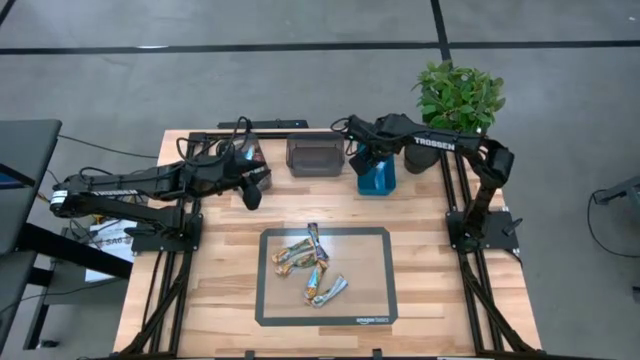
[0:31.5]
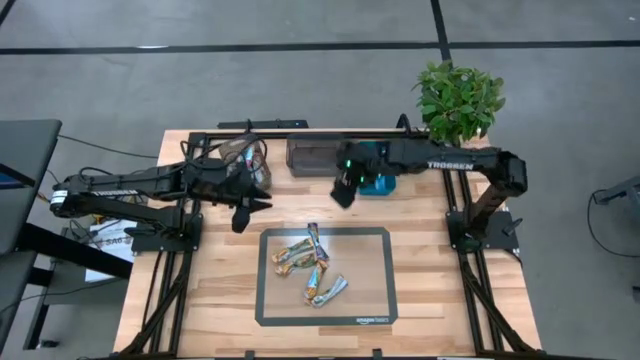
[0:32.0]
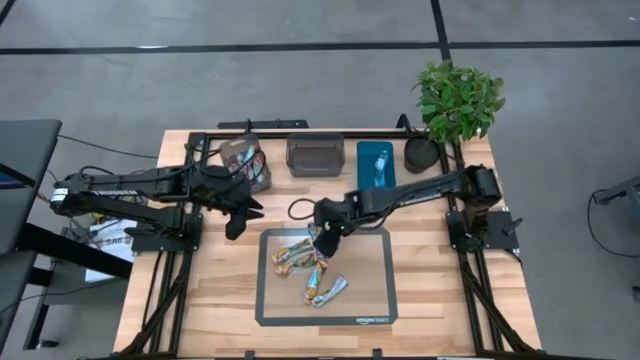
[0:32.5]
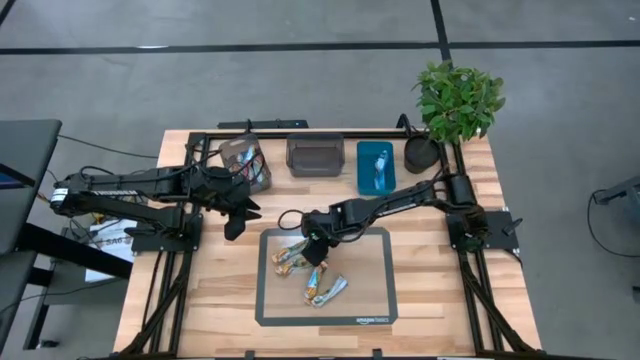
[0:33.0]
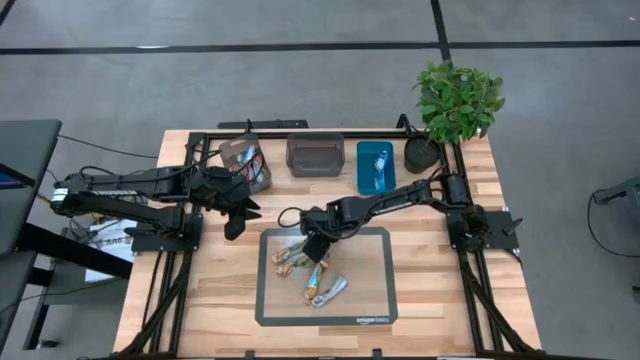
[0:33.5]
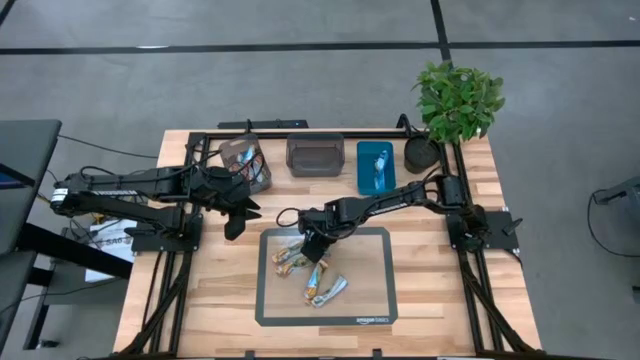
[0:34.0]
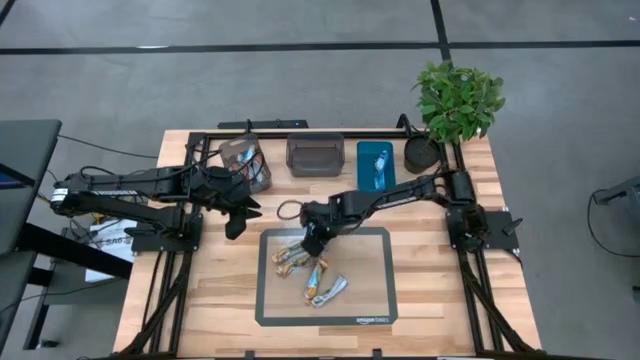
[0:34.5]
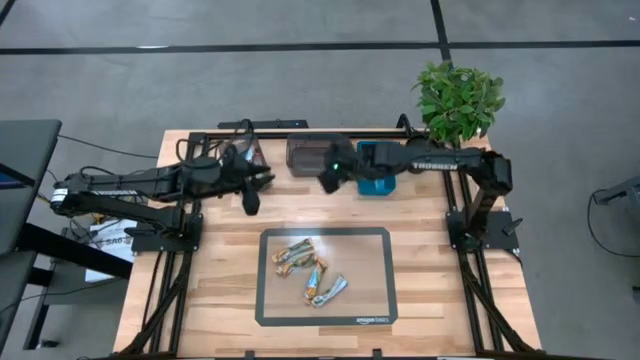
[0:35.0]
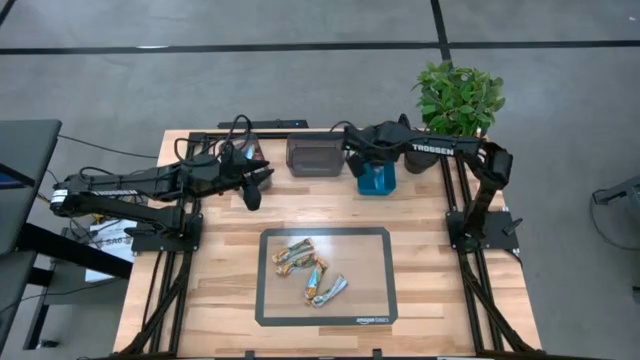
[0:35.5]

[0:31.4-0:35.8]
Task: Pick and place Granola Bars by type
Put the blue granola bar into the blue bin

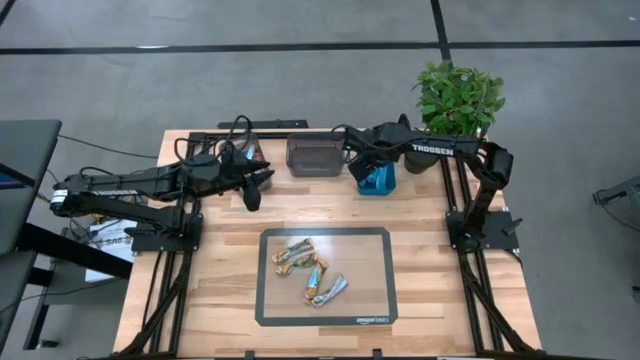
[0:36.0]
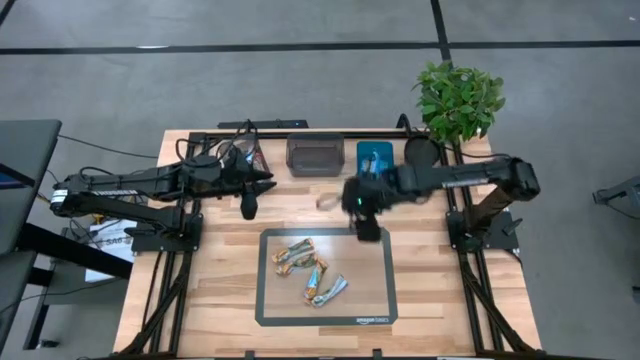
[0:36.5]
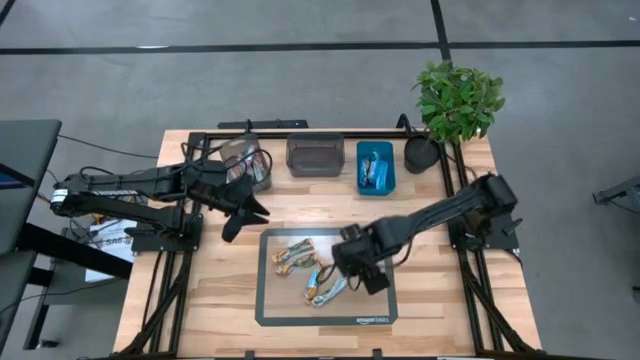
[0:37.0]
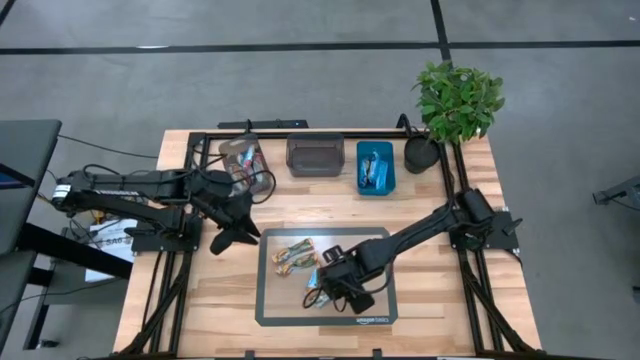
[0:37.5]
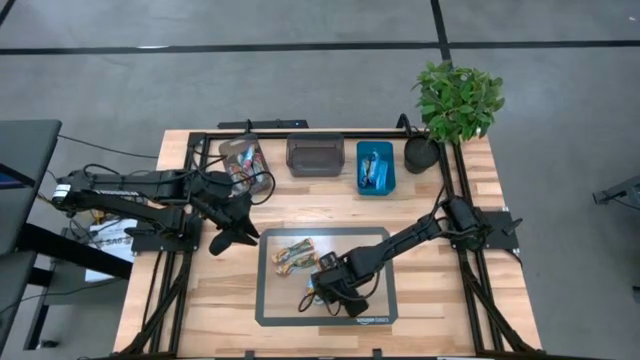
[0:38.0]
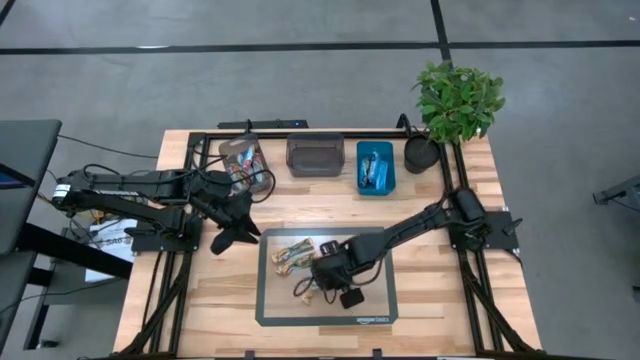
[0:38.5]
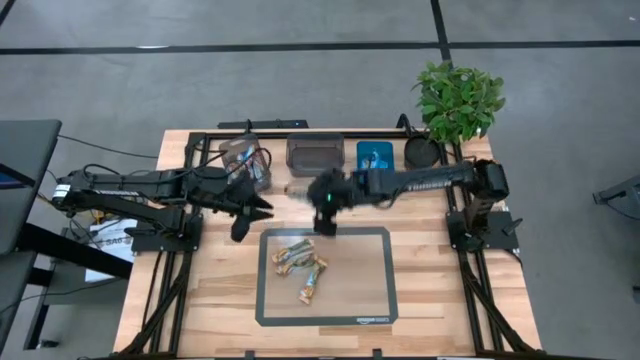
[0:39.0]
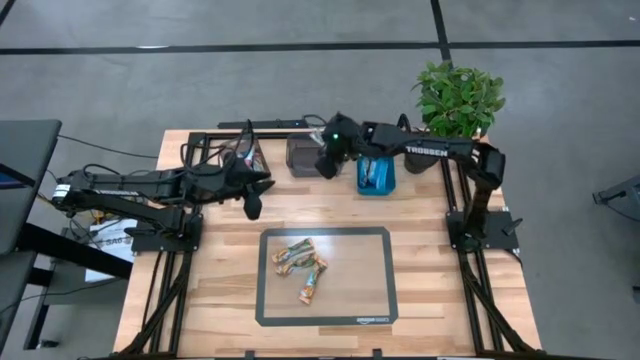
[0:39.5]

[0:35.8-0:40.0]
Put the yellow granola bar into the right black bin

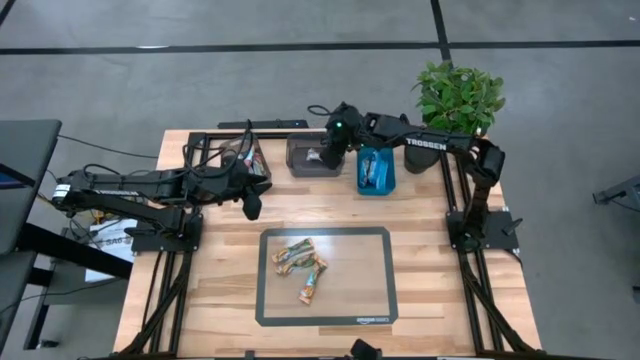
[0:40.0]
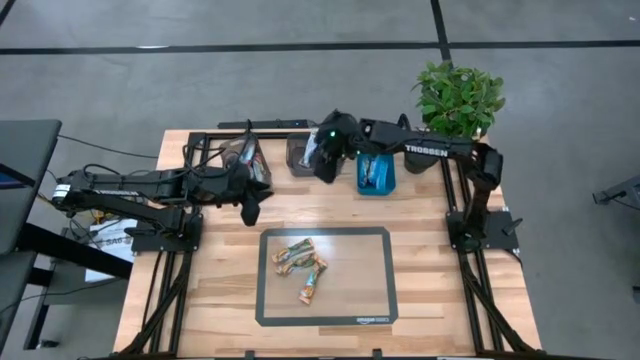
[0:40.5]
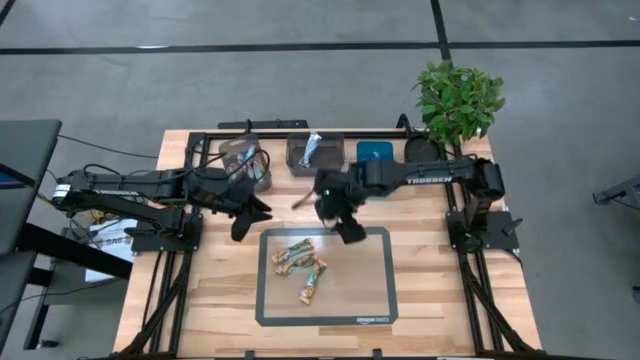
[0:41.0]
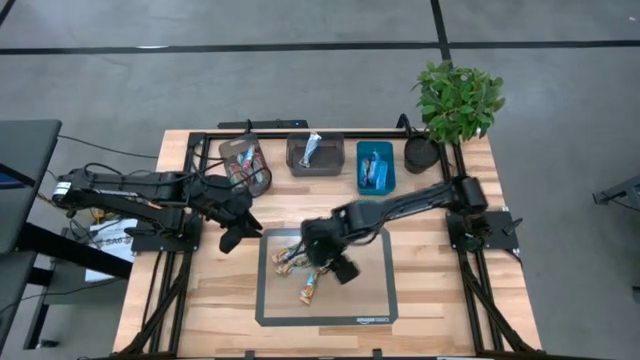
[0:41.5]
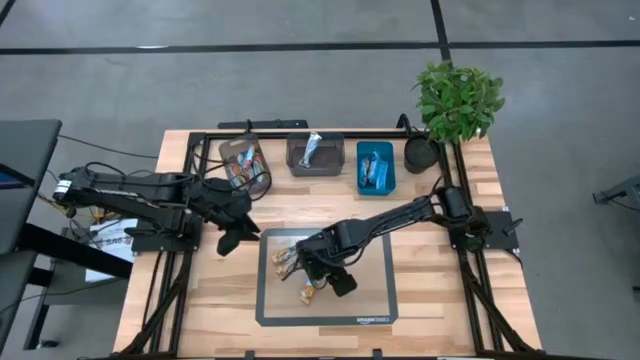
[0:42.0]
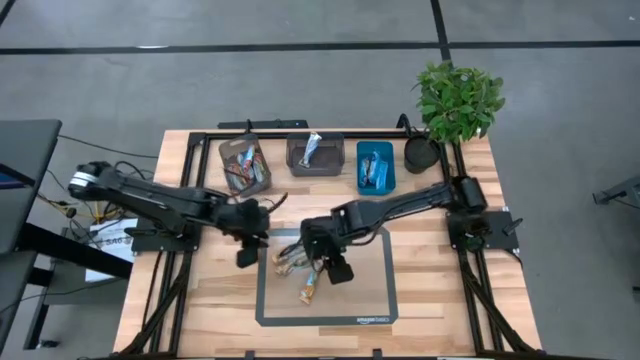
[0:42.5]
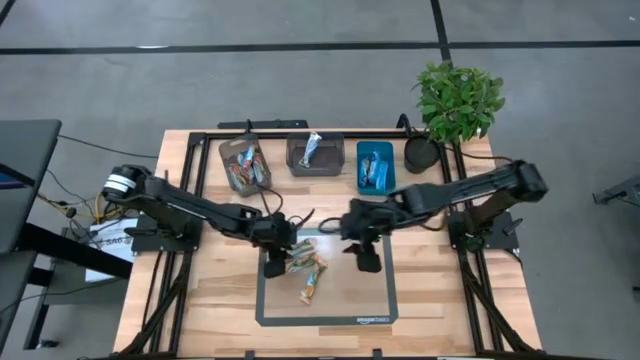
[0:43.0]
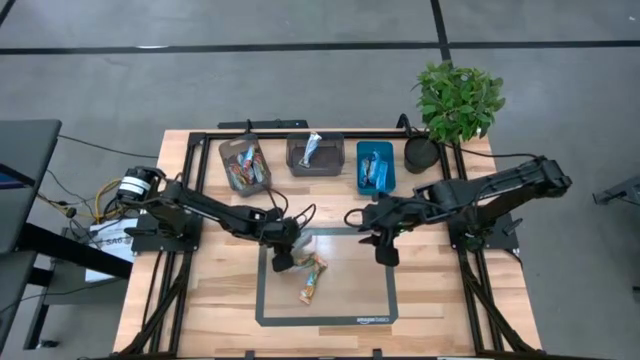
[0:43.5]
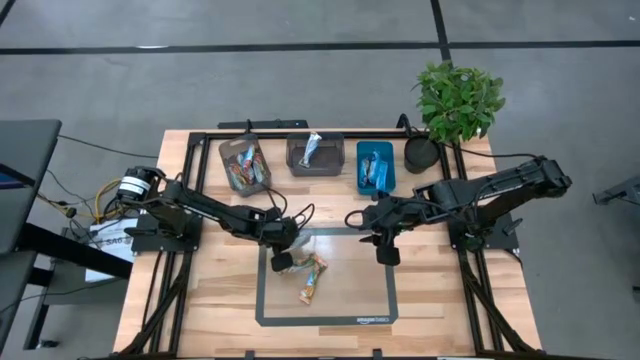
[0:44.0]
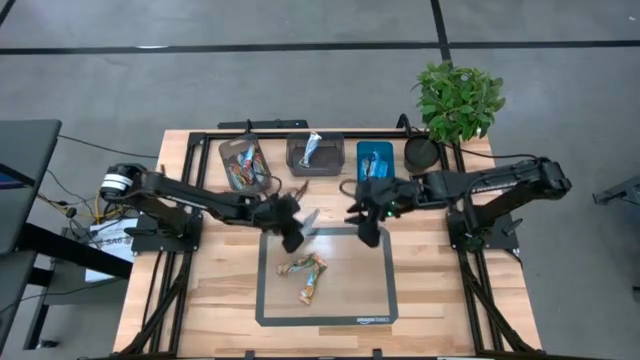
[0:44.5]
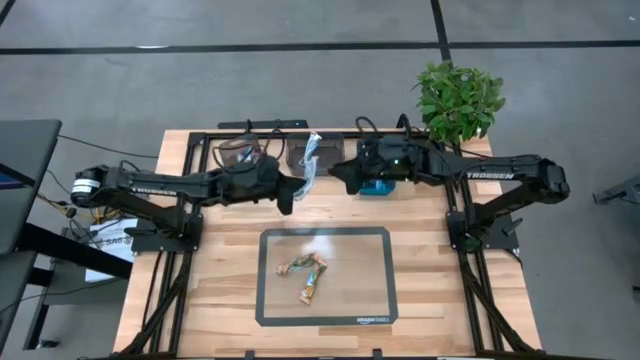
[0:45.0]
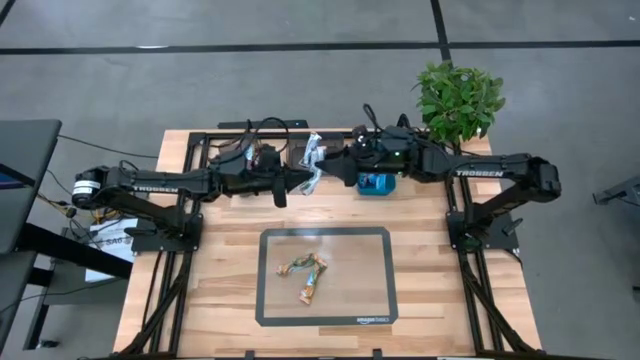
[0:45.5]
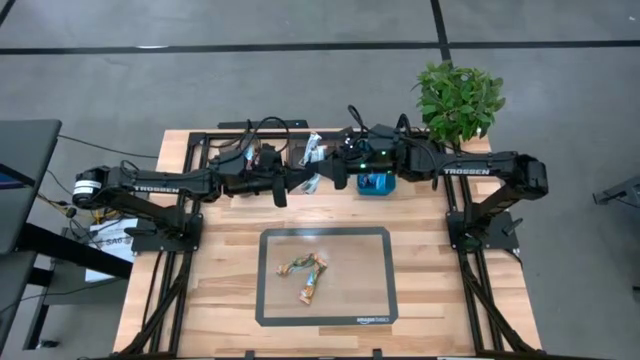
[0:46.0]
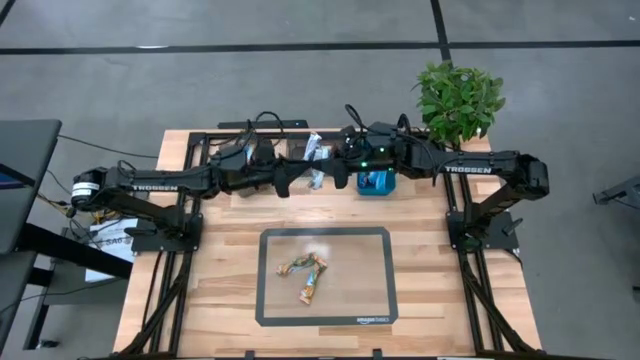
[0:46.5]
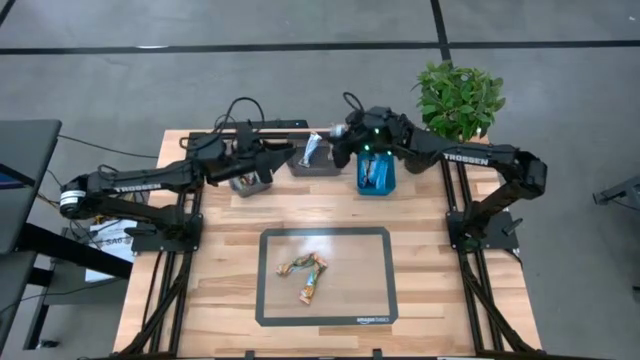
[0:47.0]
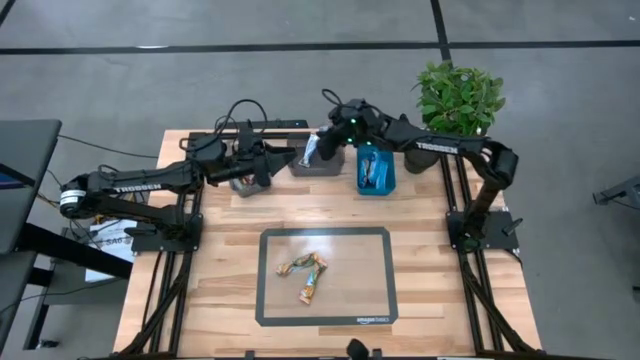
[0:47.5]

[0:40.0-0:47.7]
Put the yellow granola bar into the right black bin

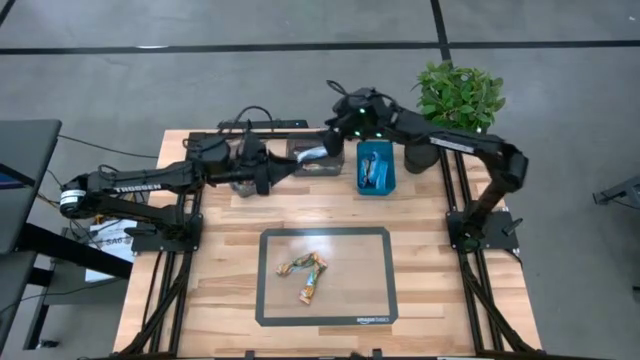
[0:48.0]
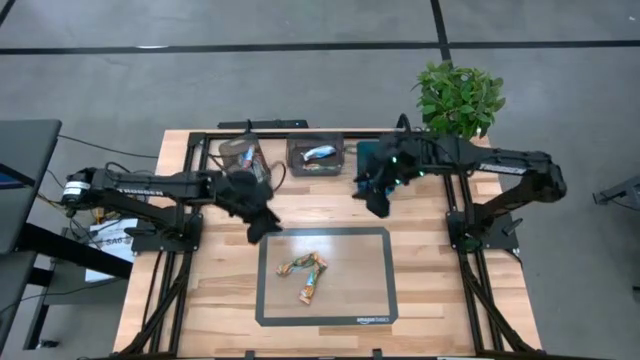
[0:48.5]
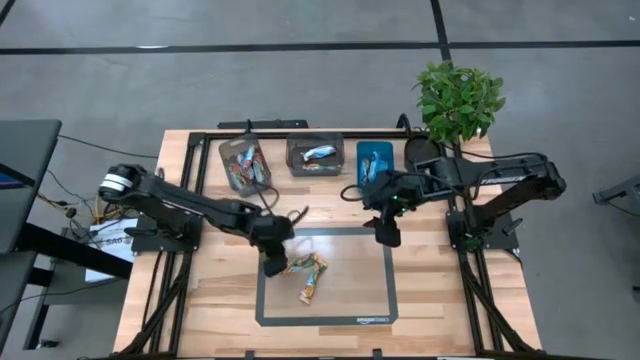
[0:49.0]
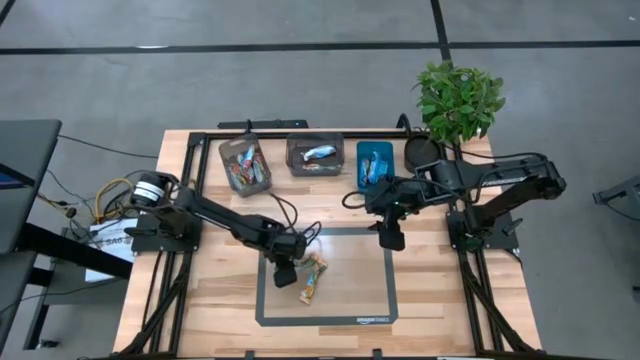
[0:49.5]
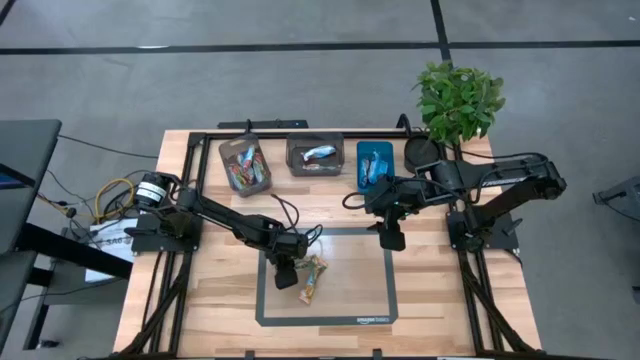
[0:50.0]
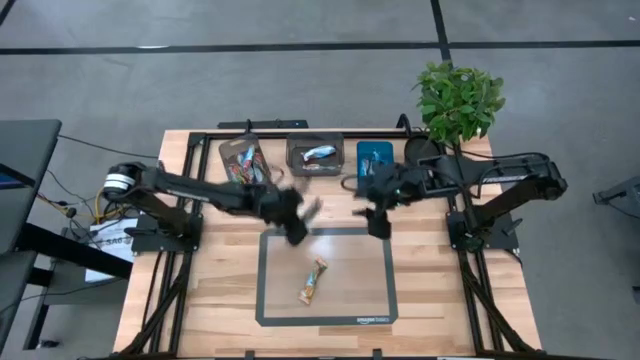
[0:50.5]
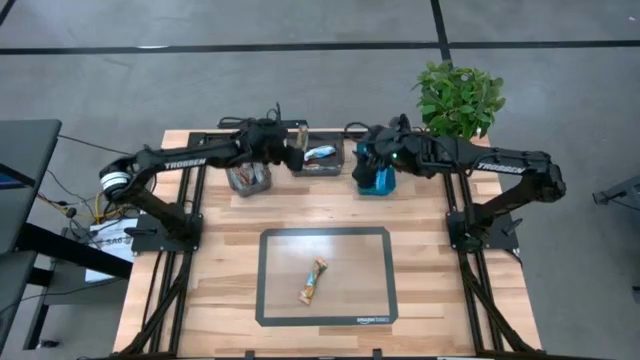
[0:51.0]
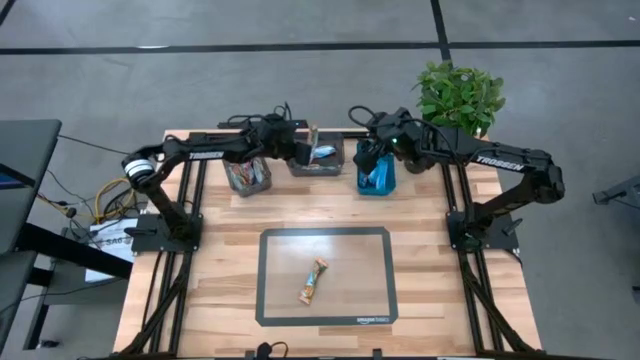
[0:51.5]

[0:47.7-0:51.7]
Put the yellow granola bar into the right black bin
